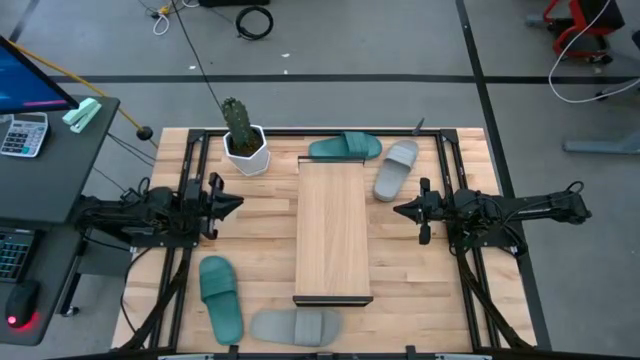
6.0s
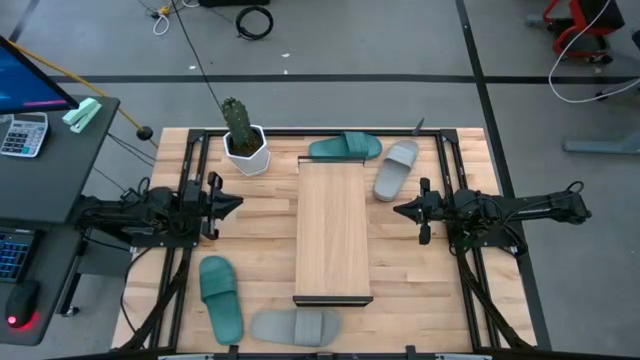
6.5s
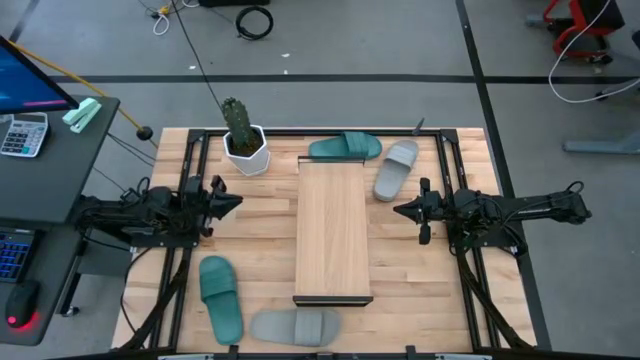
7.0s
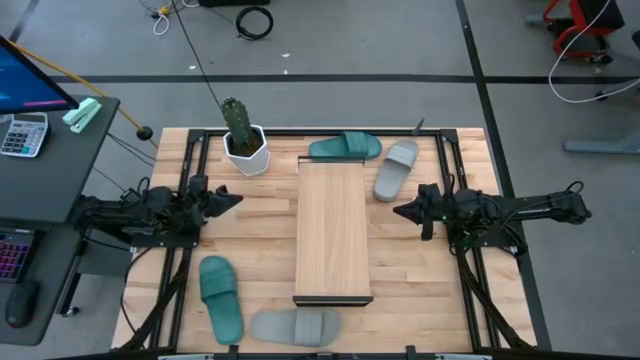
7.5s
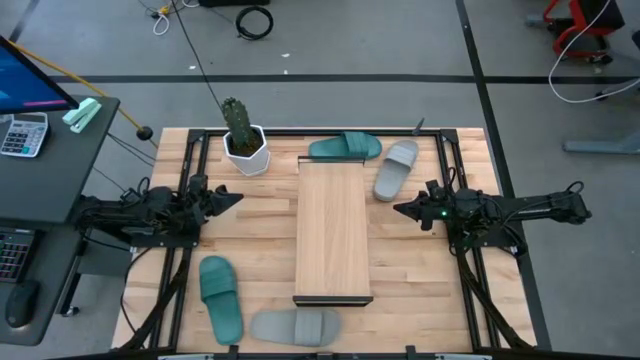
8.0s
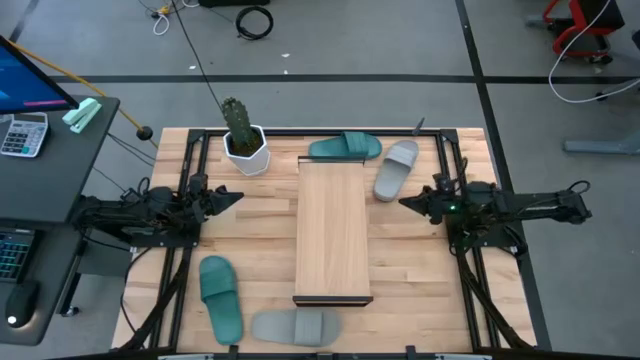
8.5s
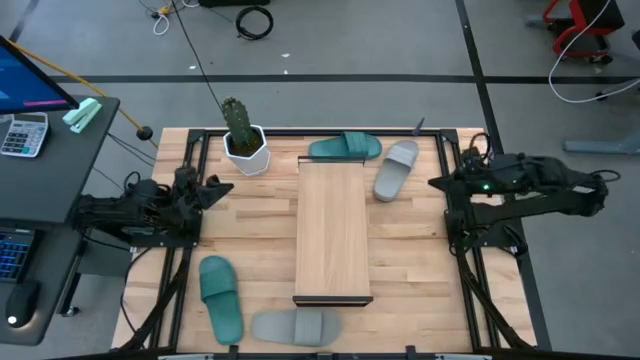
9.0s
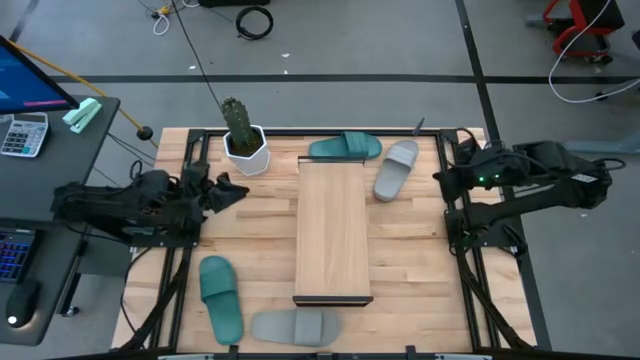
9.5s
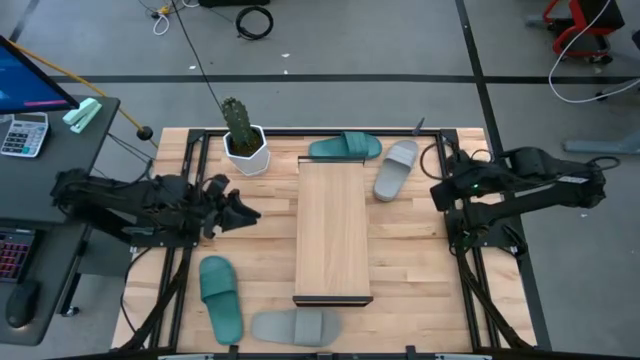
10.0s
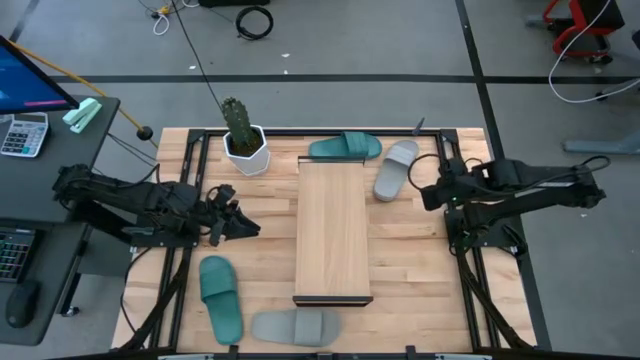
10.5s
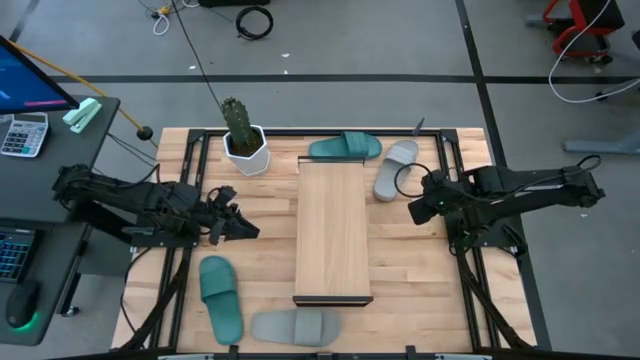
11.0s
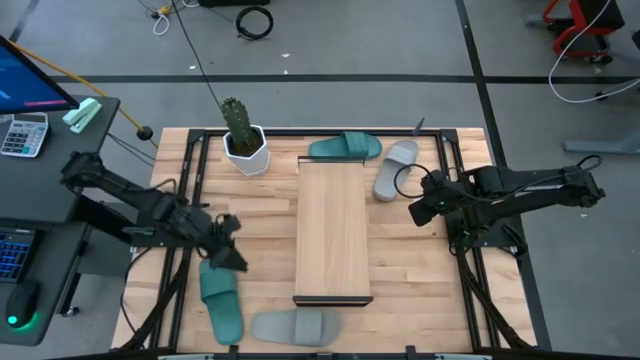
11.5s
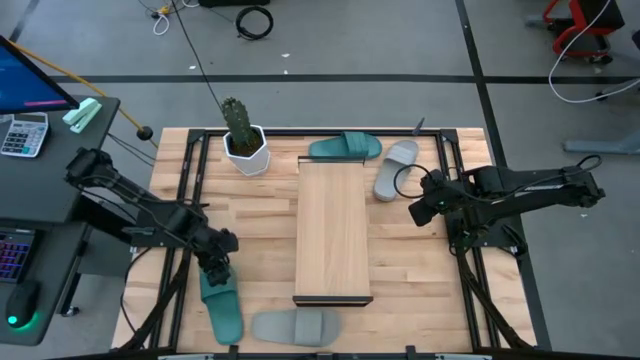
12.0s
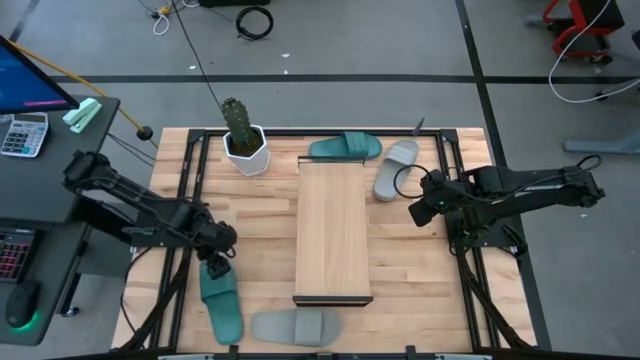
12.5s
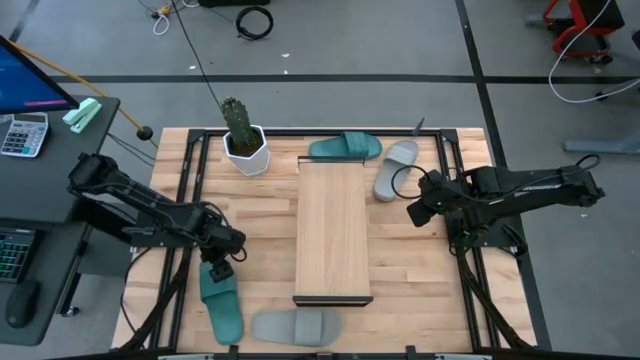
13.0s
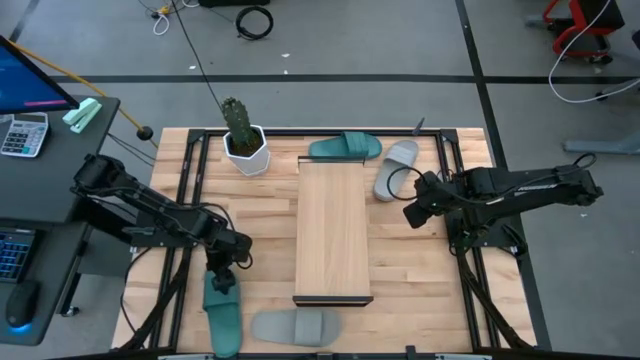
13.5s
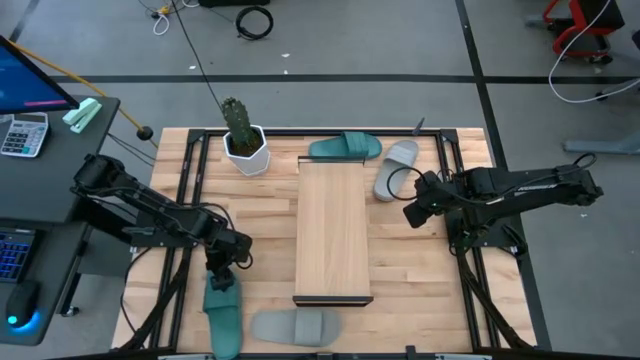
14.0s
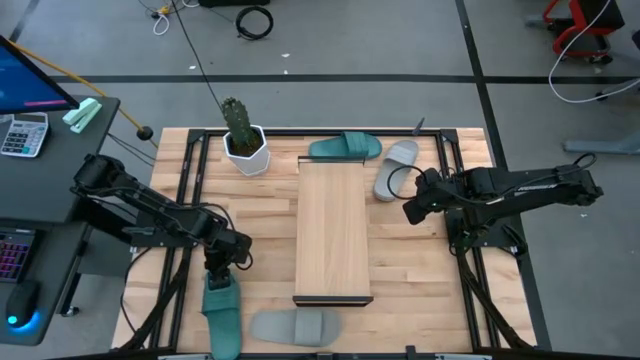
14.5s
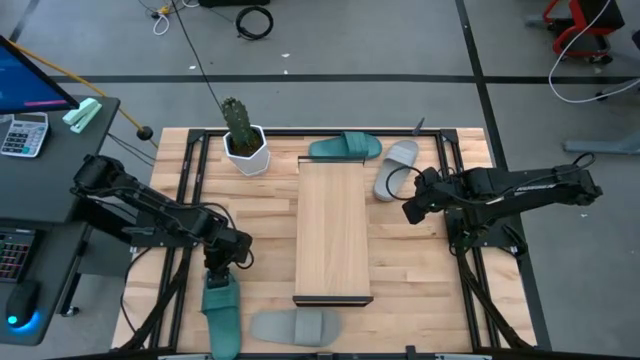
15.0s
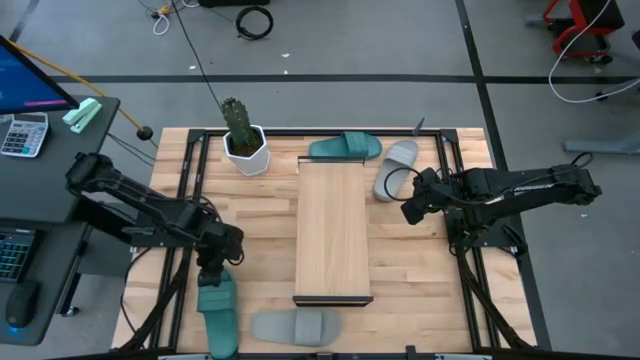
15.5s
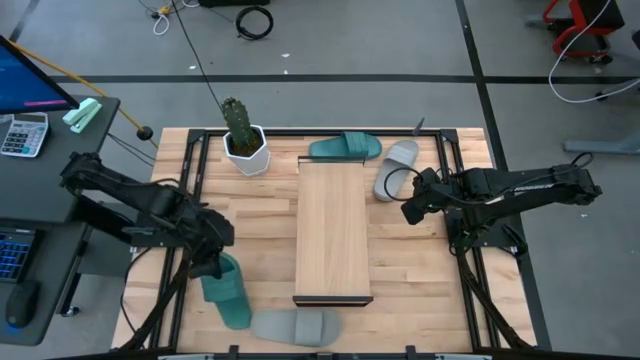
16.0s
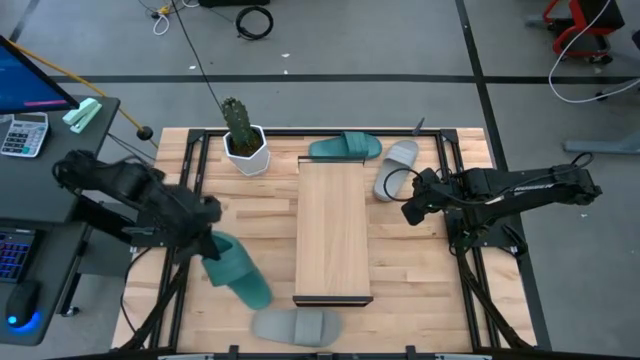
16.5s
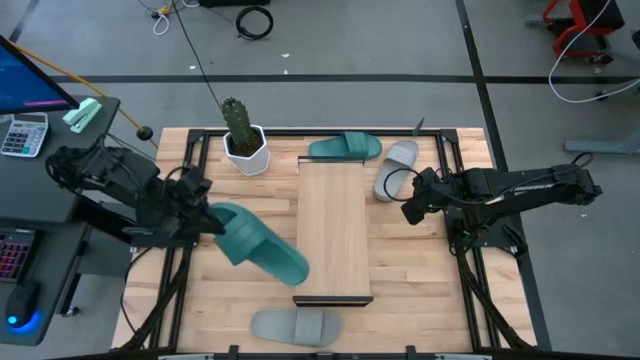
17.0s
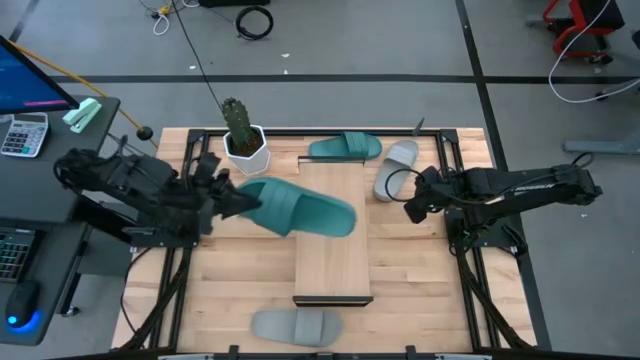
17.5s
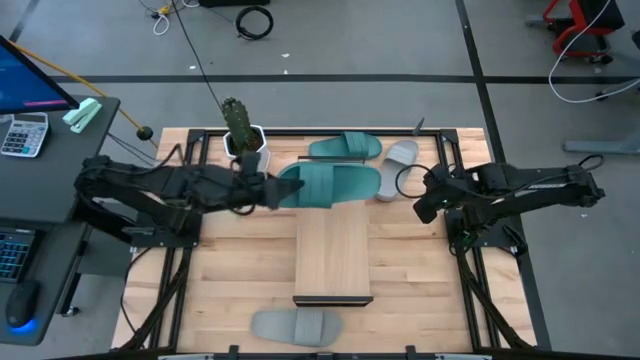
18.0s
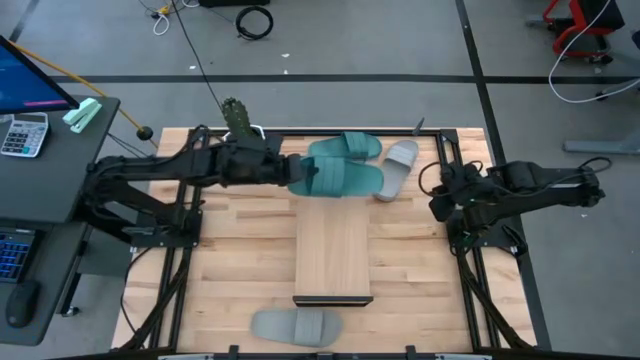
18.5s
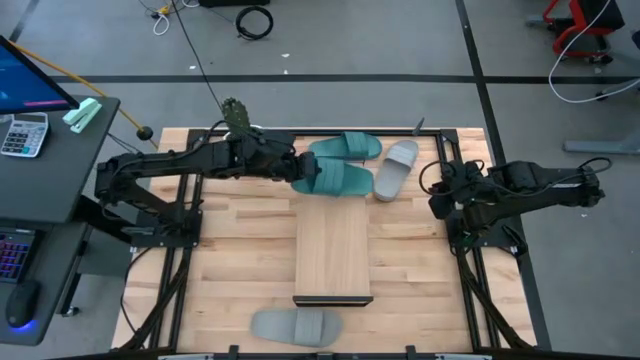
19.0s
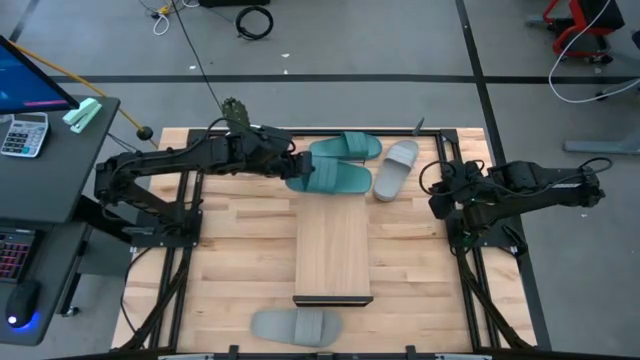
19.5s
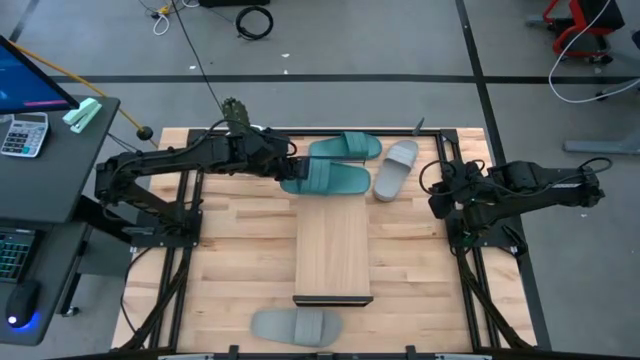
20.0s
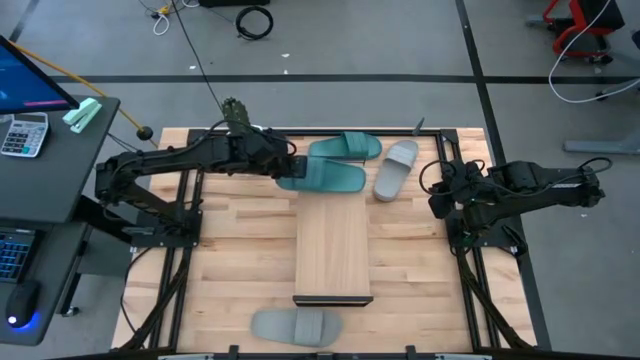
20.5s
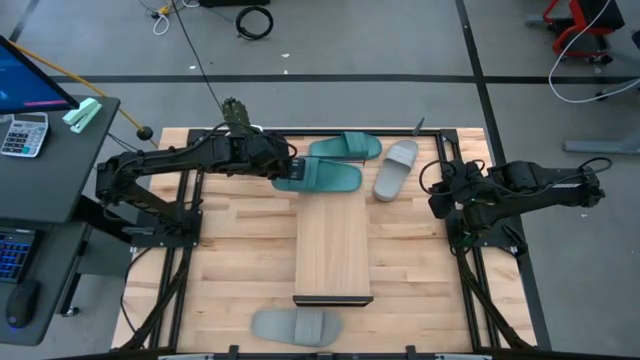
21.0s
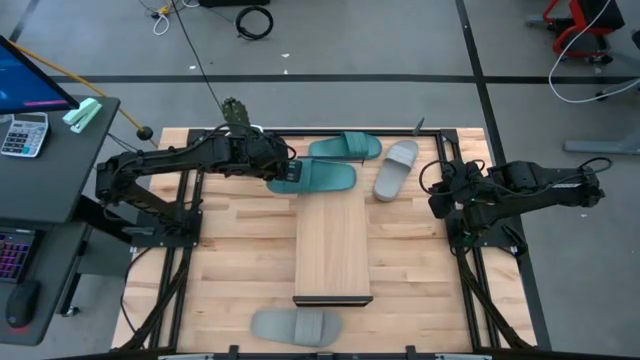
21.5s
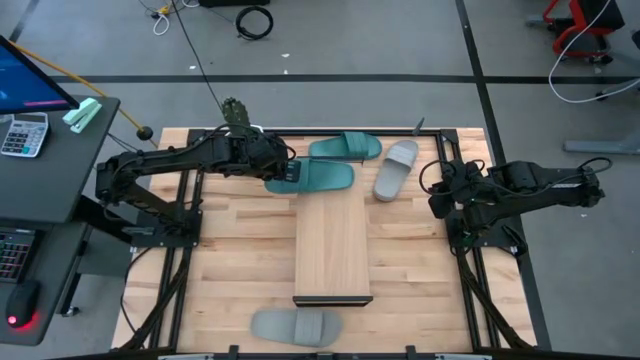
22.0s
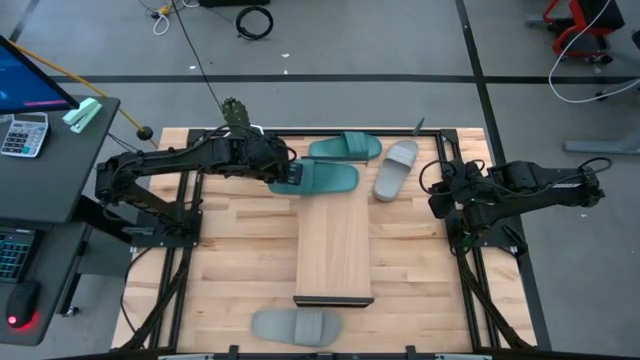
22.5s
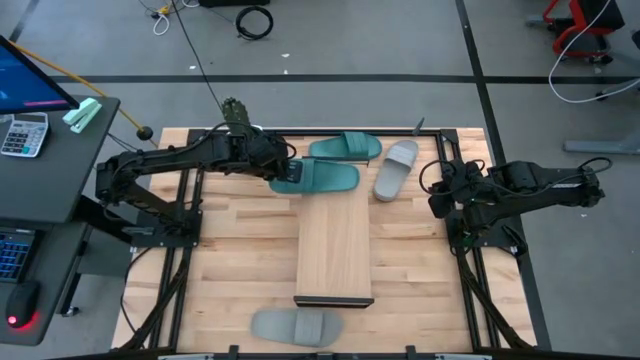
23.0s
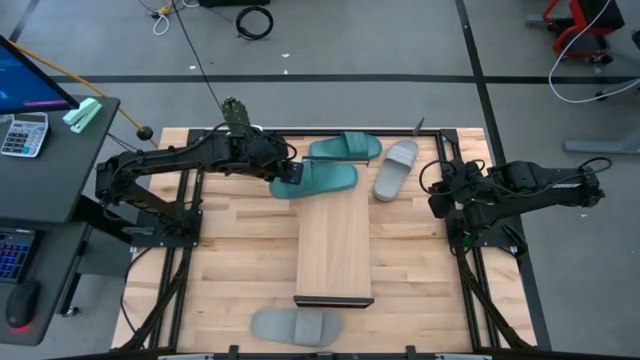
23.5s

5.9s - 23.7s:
Task: Pick and place slides into the shelf
Put the bottom green slide on the shelf
